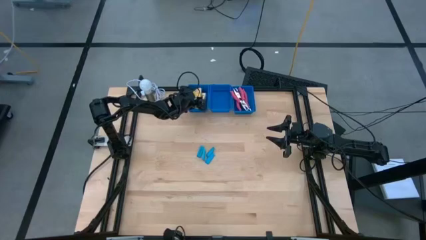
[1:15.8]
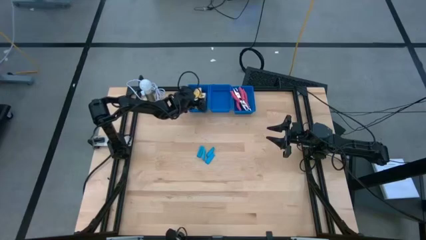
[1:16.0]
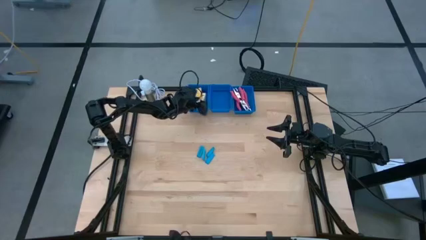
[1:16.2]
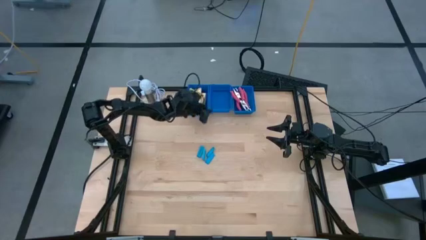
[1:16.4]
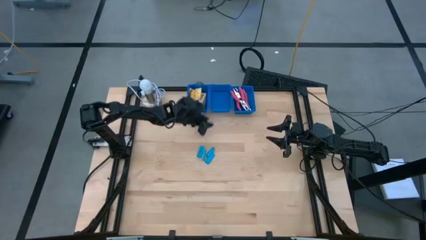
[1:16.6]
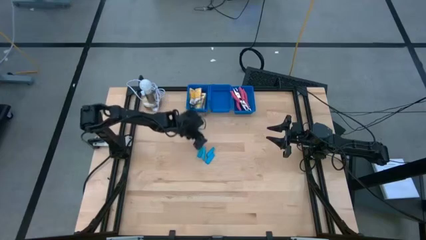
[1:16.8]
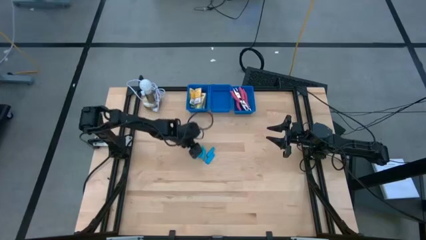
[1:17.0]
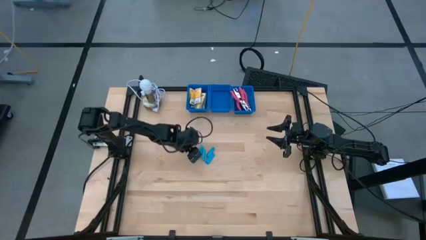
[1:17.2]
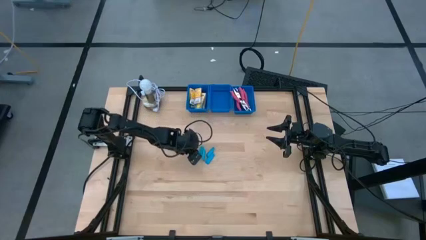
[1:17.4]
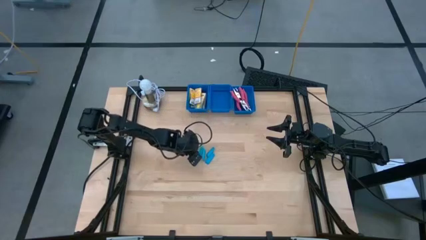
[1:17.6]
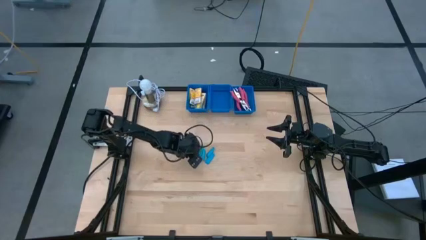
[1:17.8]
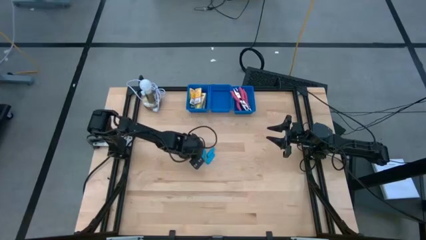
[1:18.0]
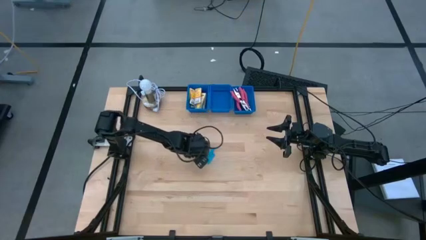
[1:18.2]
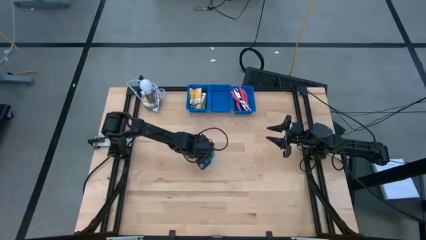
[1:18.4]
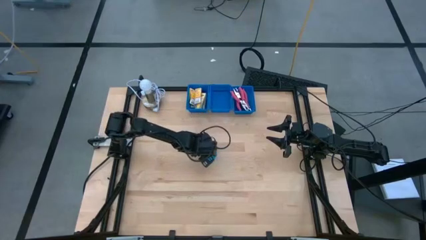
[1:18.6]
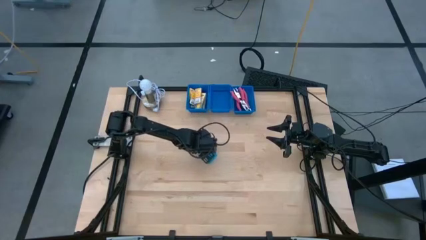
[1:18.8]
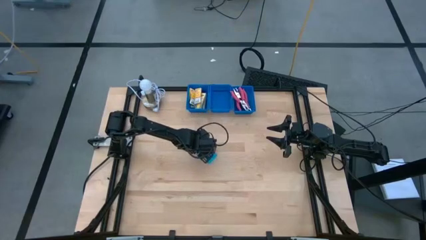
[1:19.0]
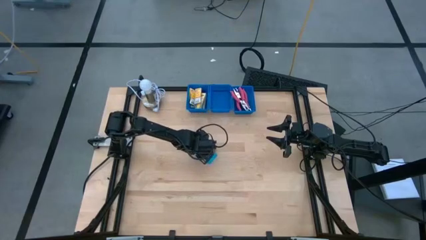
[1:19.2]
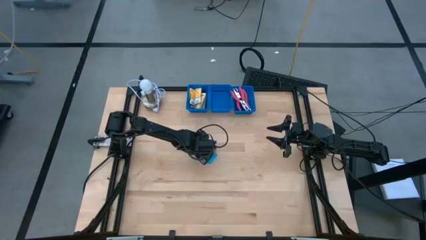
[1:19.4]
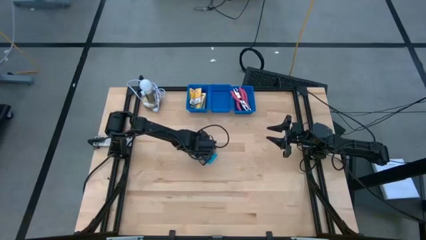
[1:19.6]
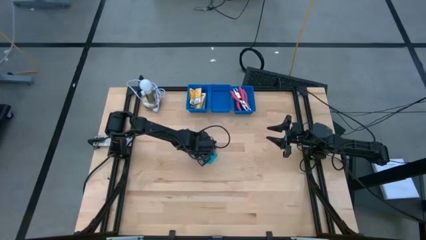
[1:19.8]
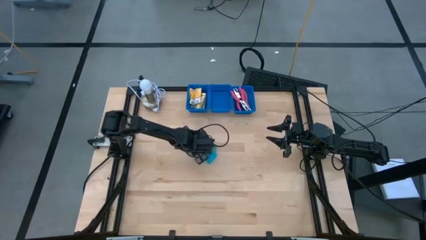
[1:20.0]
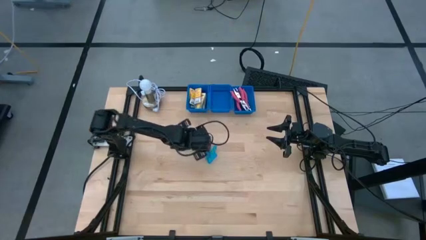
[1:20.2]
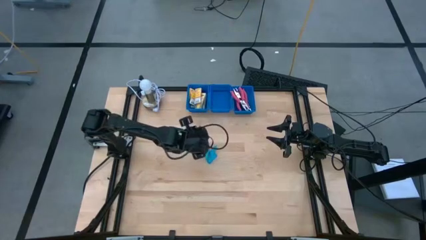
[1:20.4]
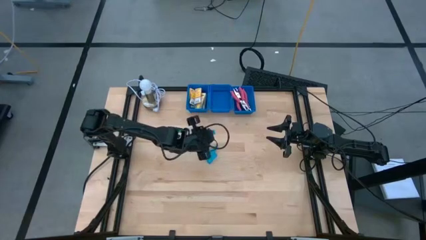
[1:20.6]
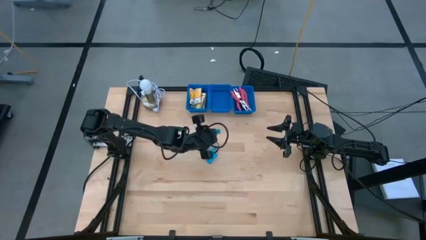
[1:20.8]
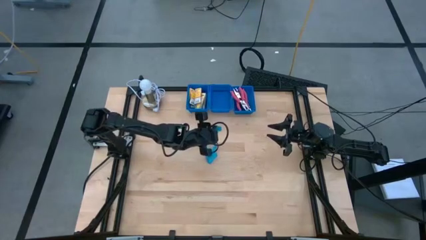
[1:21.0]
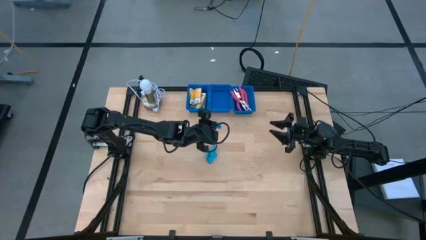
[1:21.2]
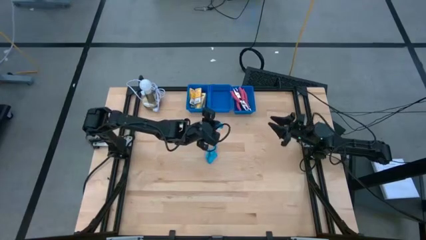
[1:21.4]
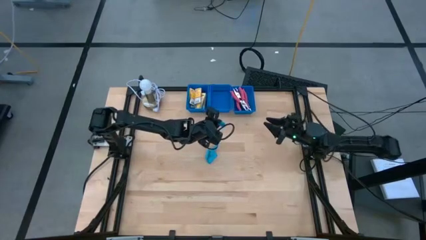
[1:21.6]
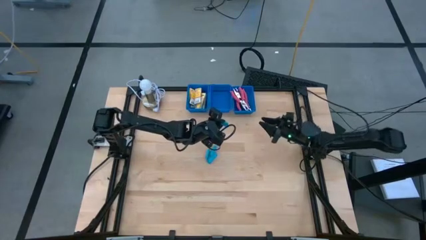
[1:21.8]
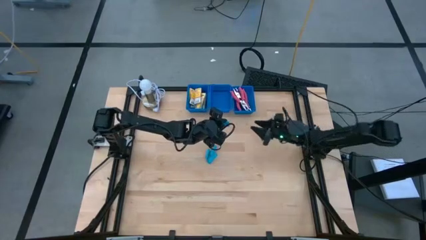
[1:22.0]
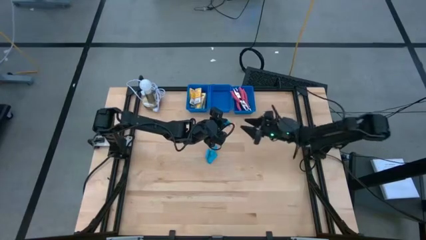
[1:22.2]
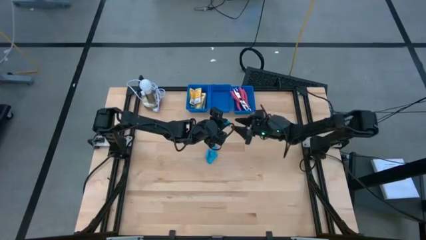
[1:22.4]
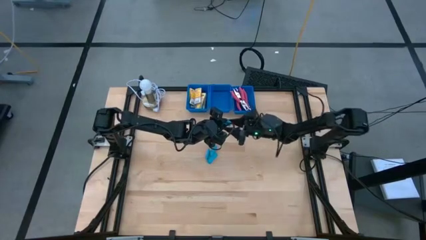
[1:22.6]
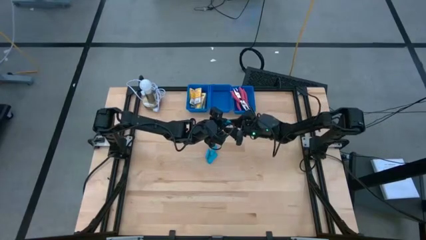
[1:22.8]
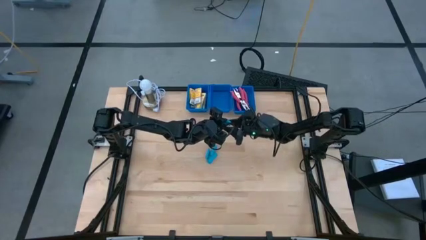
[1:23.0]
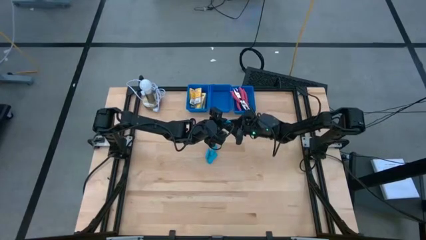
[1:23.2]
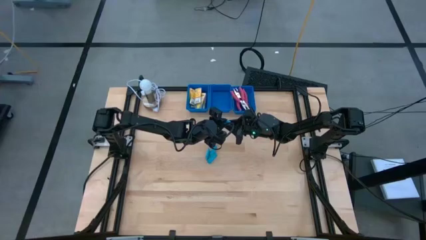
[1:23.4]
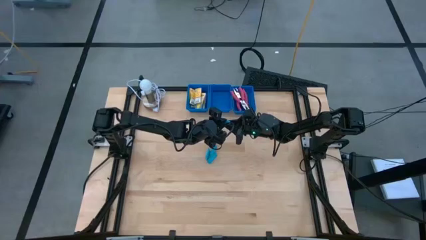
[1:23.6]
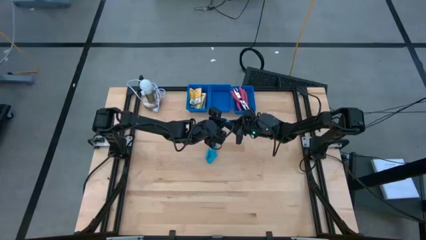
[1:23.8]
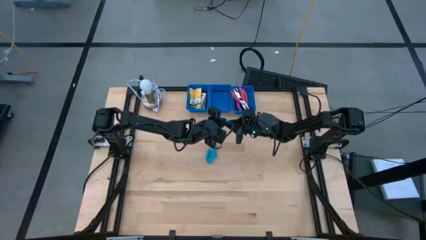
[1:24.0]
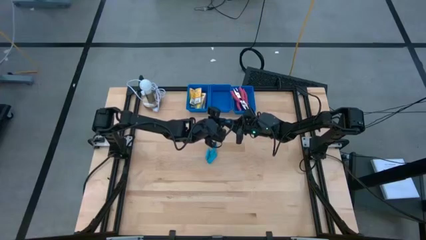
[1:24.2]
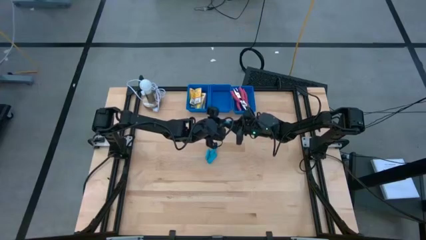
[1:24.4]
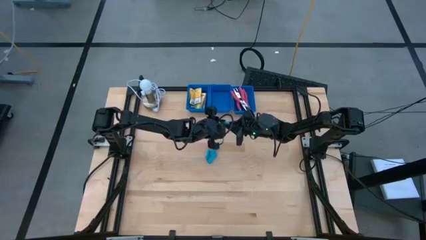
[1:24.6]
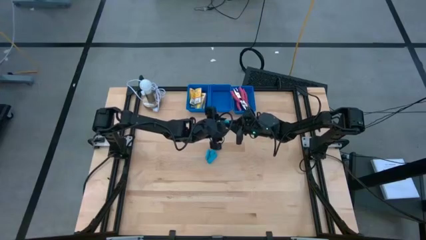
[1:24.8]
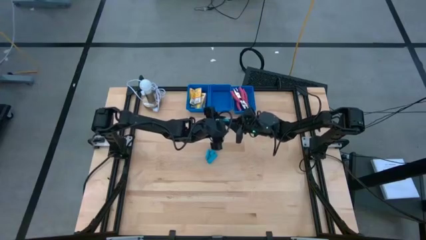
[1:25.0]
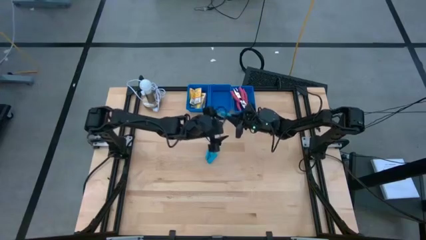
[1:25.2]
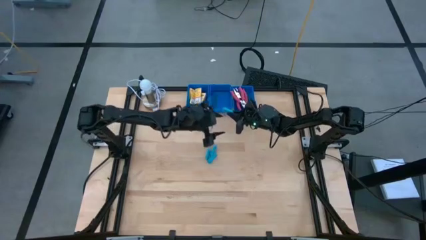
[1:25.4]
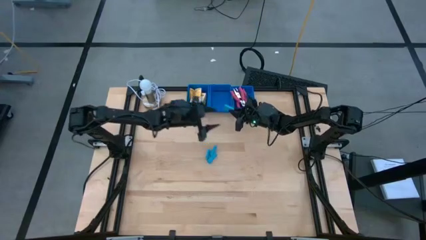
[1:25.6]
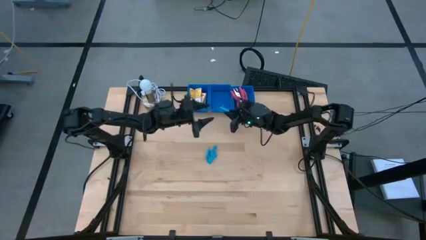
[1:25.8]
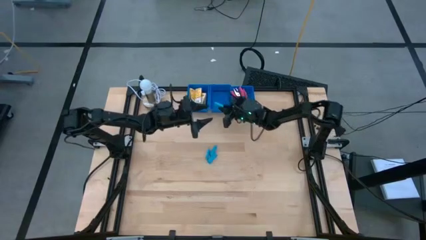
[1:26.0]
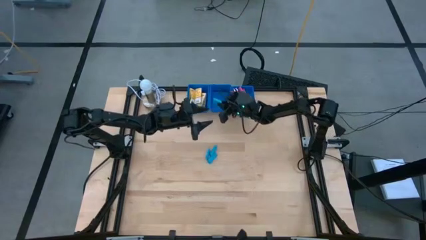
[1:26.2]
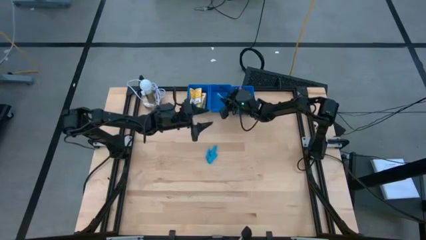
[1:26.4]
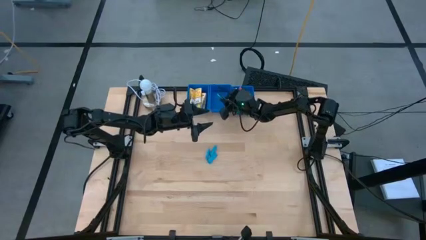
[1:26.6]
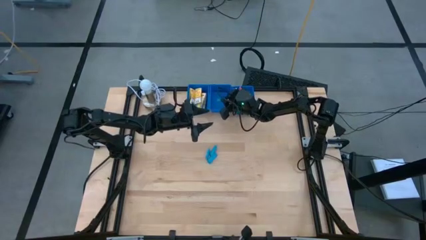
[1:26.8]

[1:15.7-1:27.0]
Task: Pick & Place School Supplies
Put the blue eraser into the middle blue bin

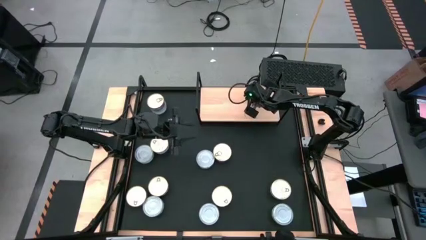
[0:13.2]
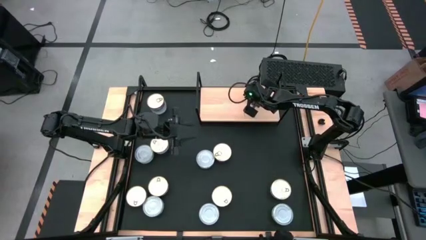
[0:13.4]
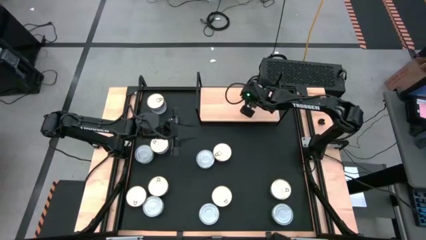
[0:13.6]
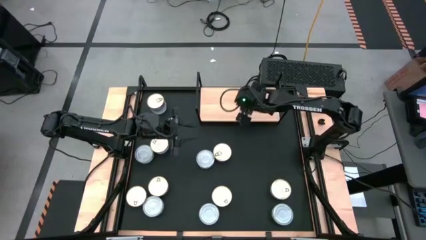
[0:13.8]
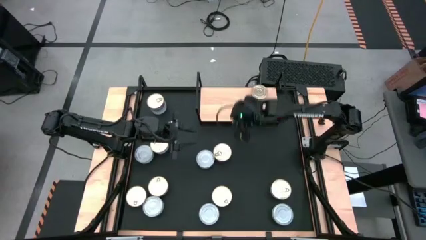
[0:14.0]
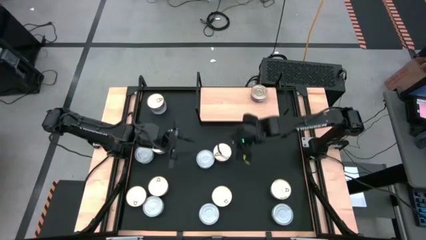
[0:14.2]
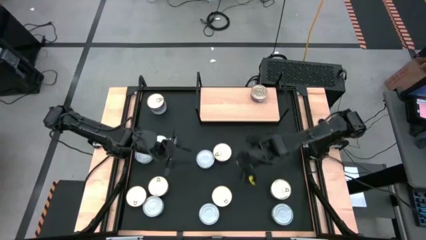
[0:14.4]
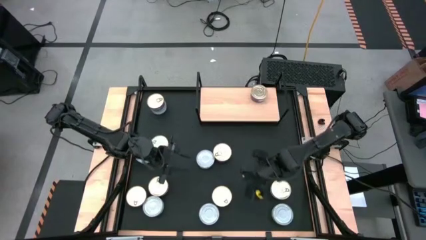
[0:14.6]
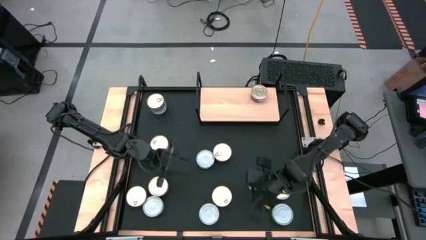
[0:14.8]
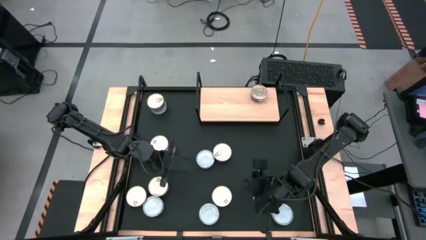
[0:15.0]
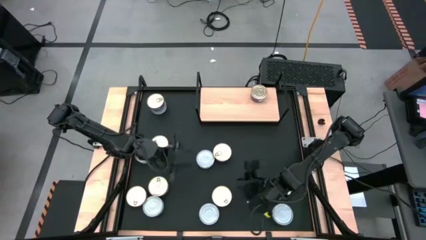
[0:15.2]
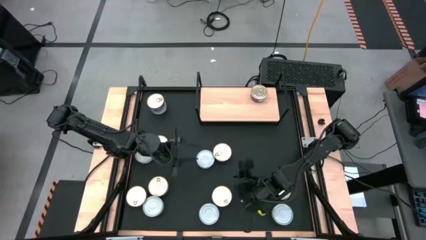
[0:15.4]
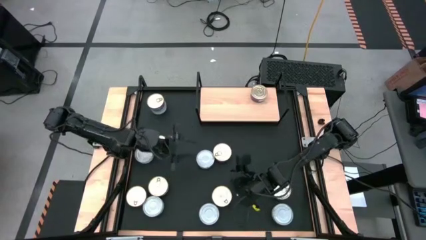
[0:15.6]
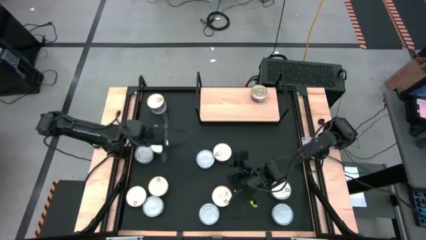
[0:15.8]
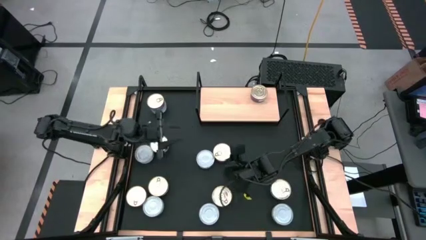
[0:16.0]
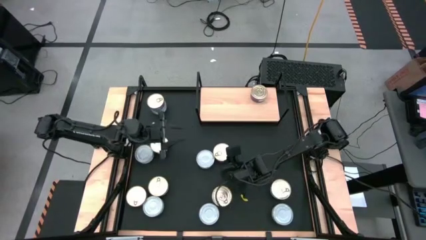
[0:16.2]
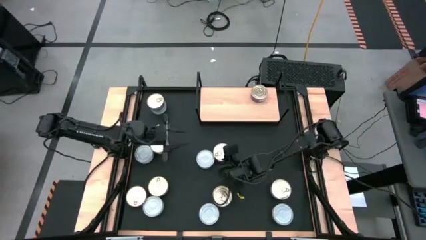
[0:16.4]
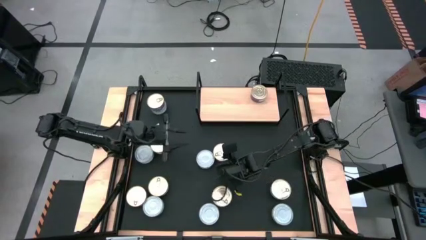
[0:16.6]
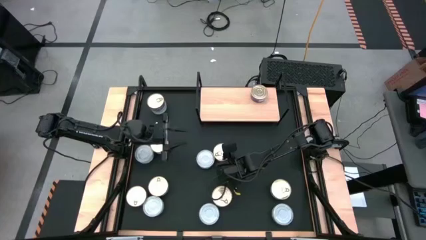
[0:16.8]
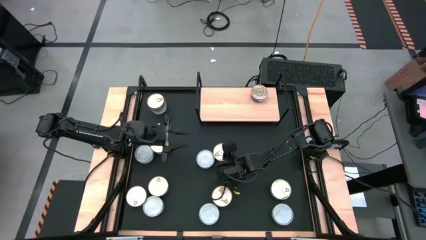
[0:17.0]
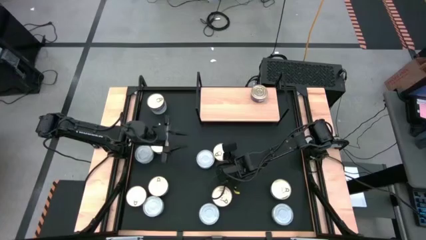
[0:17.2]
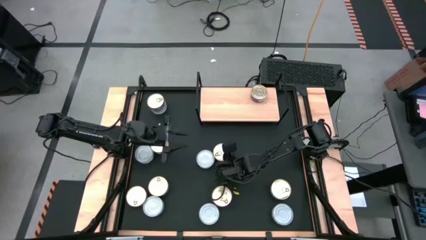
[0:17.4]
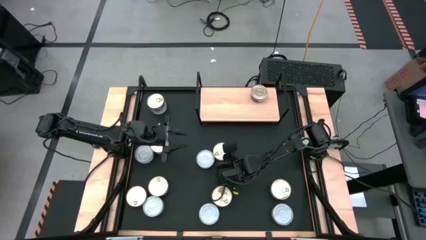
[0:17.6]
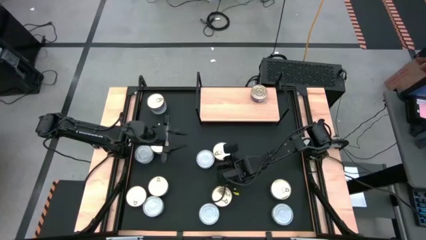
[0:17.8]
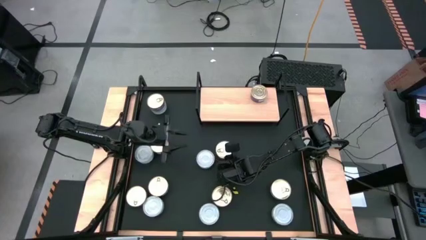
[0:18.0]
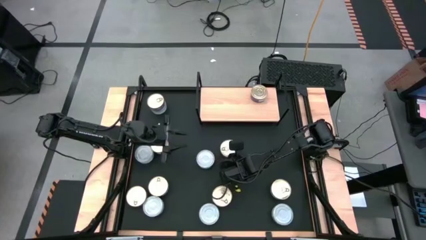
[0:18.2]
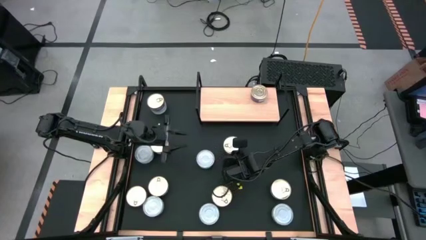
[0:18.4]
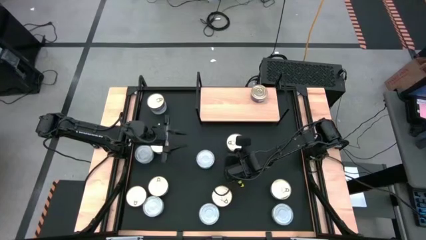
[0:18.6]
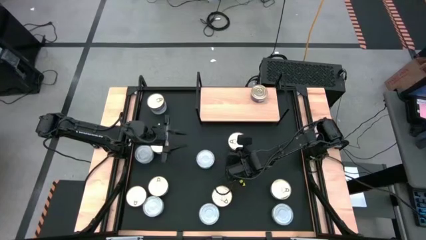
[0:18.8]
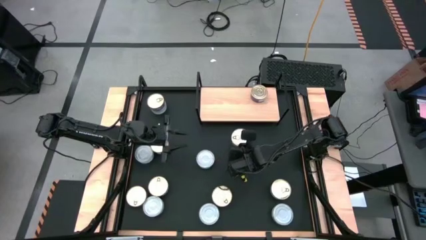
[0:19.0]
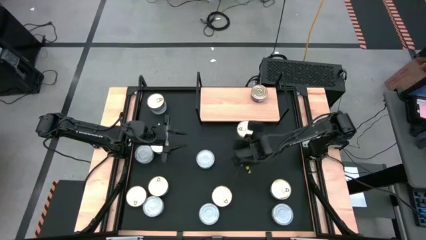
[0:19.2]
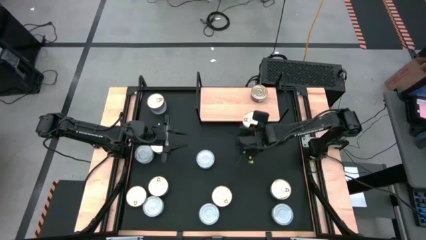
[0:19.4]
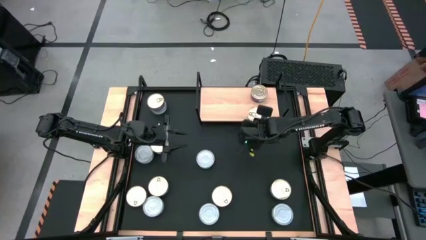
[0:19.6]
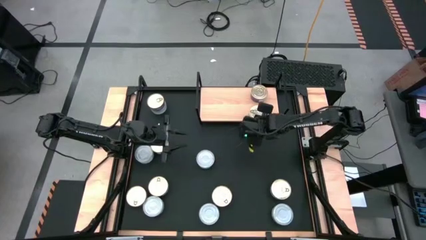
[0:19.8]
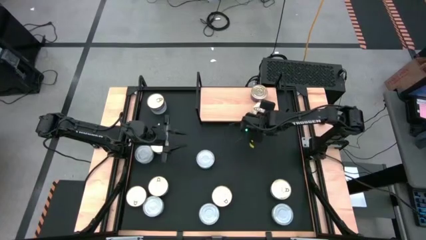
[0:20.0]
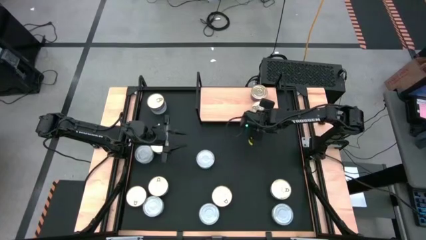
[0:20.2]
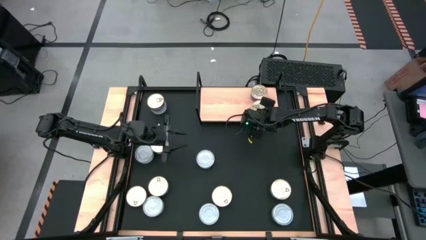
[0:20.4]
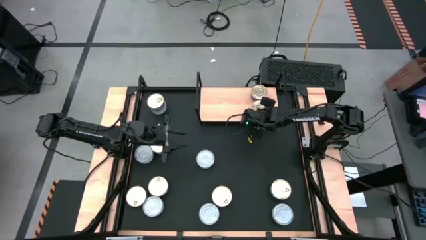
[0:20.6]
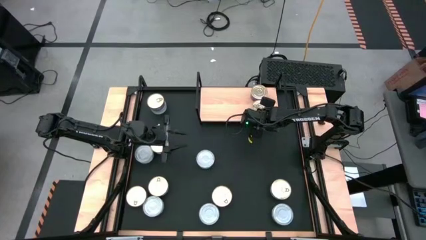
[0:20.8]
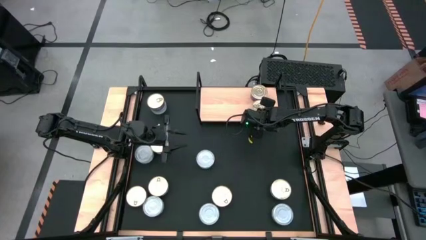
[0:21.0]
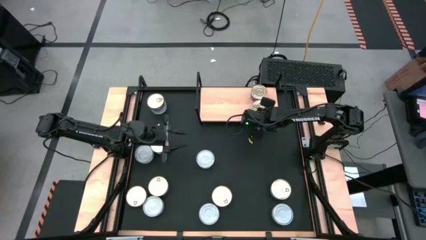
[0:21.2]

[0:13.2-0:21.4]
Task: Stack canned seafood by type on shelf
Put the blue pink tuna can on the shelf
